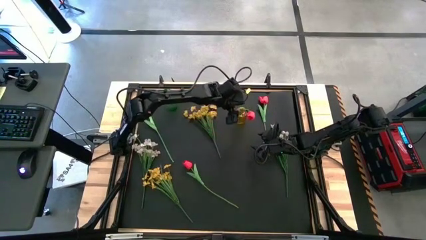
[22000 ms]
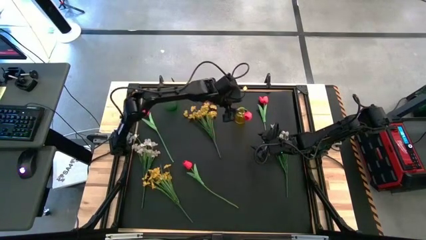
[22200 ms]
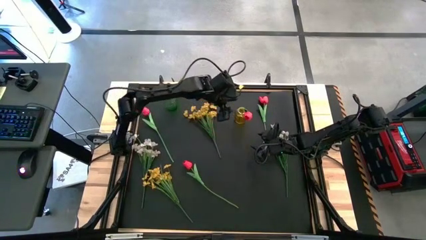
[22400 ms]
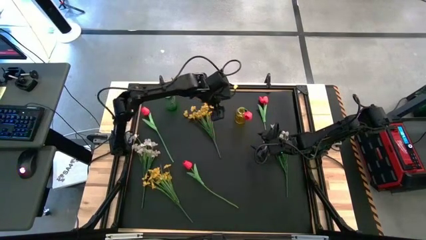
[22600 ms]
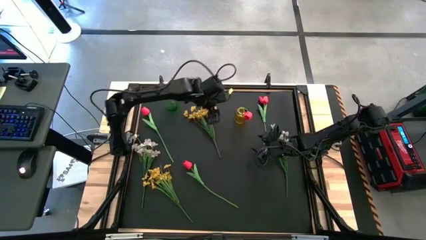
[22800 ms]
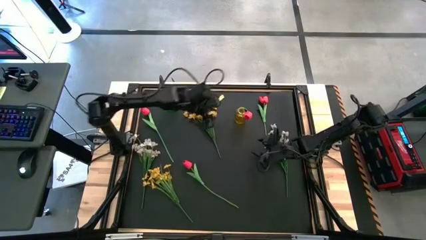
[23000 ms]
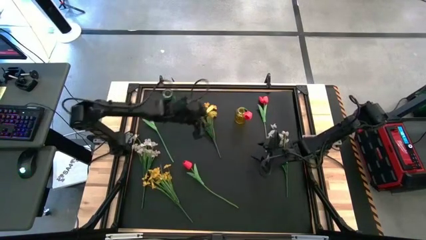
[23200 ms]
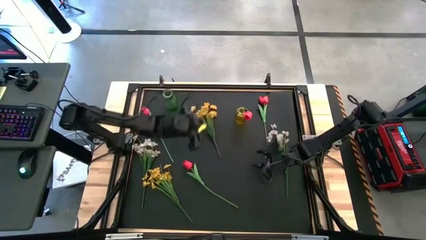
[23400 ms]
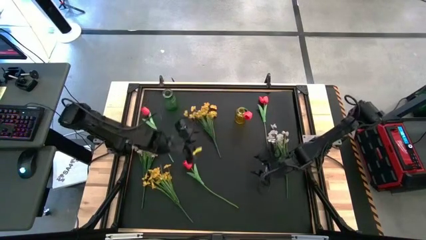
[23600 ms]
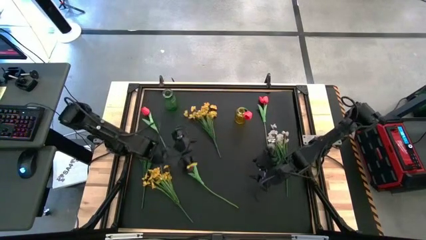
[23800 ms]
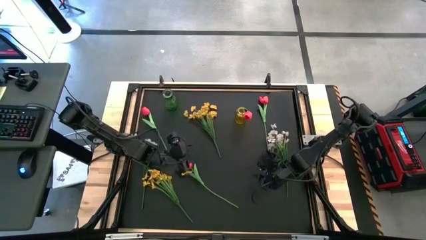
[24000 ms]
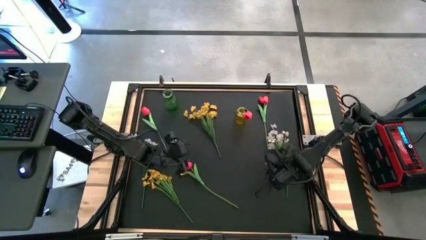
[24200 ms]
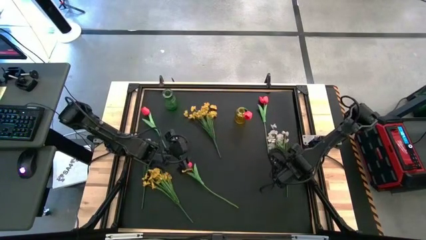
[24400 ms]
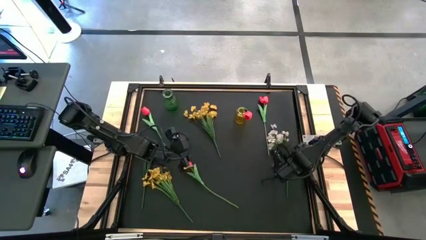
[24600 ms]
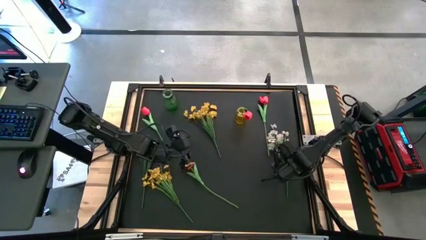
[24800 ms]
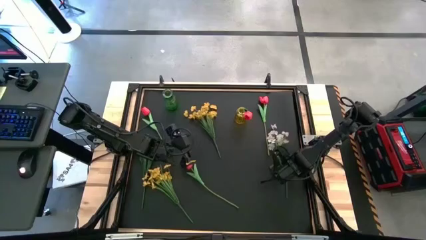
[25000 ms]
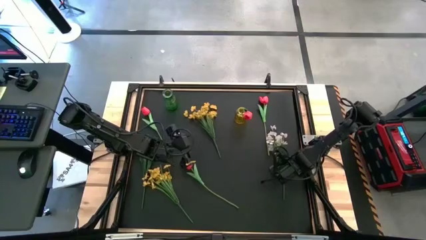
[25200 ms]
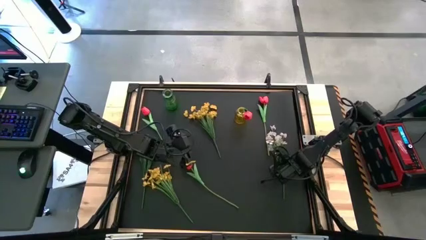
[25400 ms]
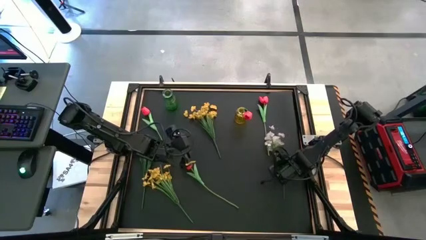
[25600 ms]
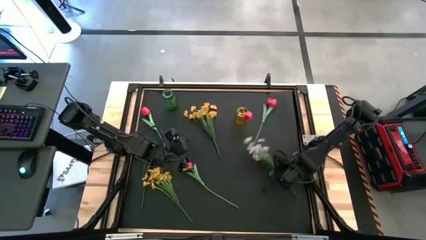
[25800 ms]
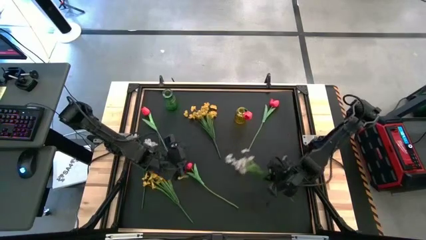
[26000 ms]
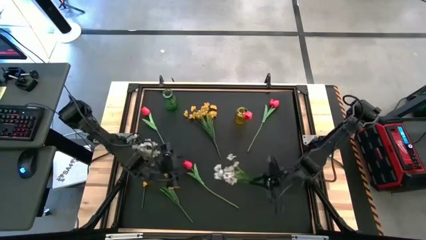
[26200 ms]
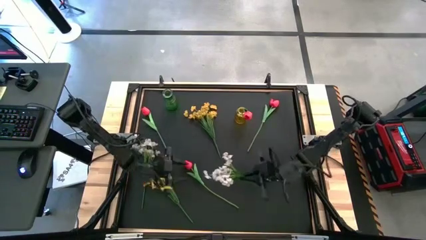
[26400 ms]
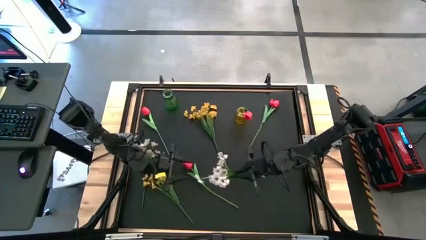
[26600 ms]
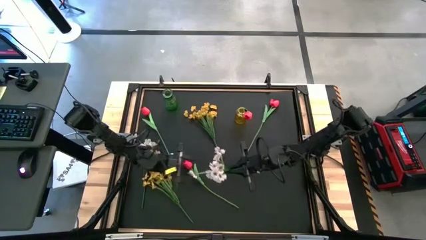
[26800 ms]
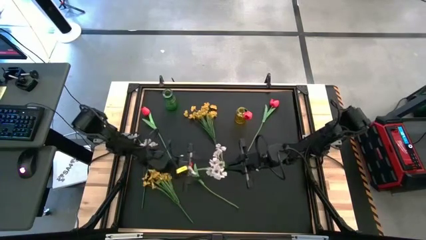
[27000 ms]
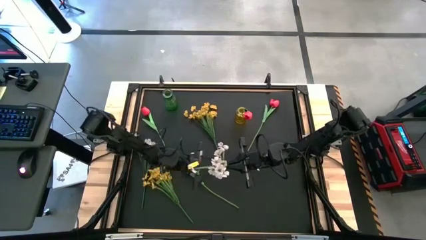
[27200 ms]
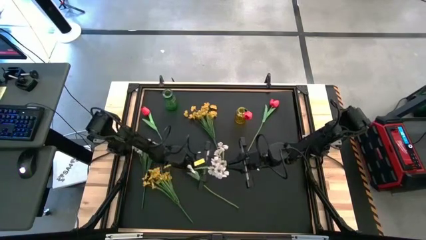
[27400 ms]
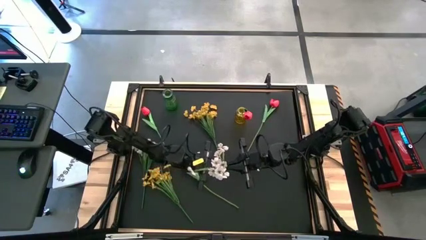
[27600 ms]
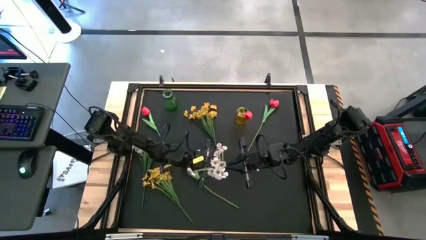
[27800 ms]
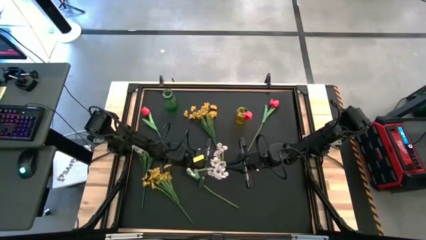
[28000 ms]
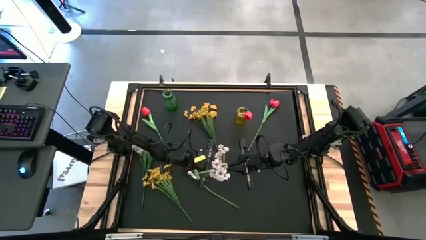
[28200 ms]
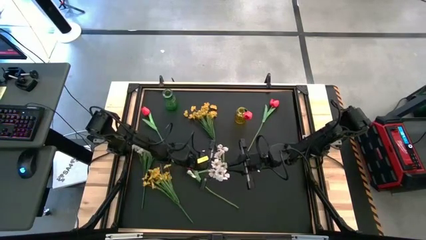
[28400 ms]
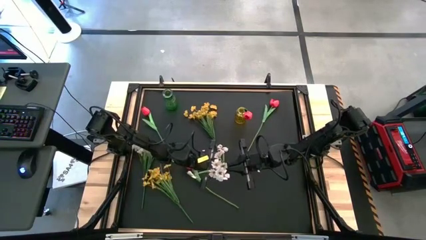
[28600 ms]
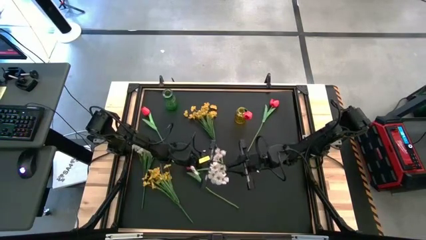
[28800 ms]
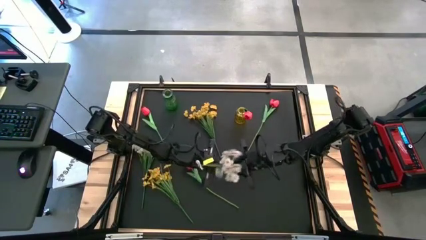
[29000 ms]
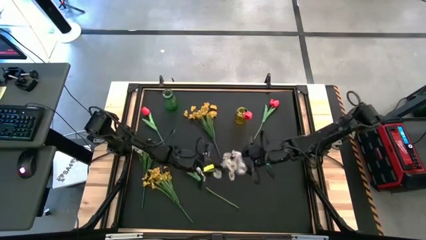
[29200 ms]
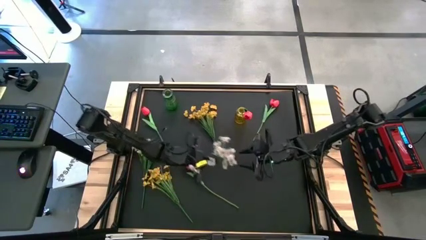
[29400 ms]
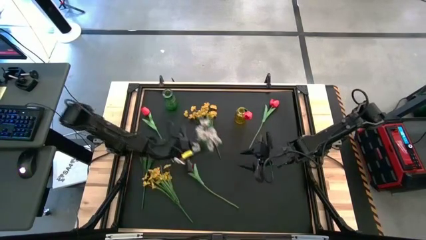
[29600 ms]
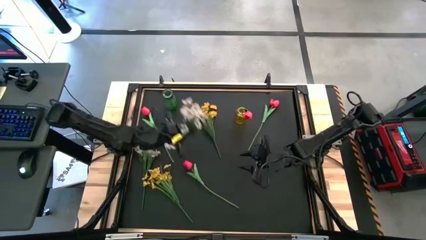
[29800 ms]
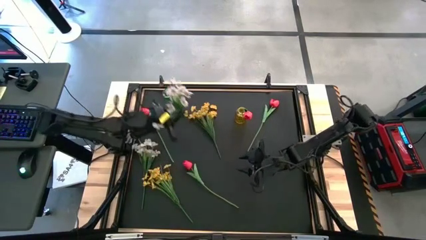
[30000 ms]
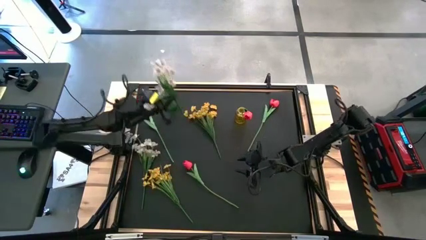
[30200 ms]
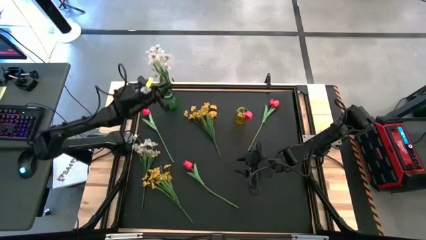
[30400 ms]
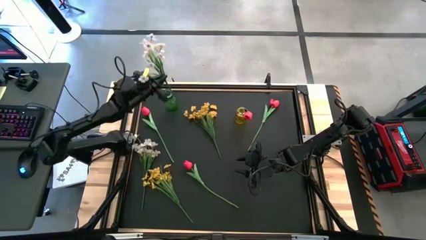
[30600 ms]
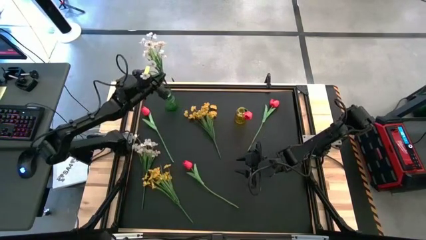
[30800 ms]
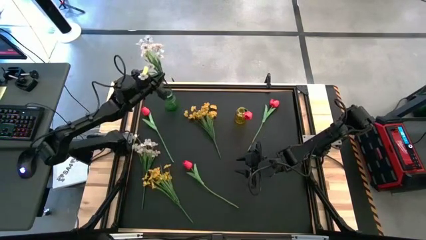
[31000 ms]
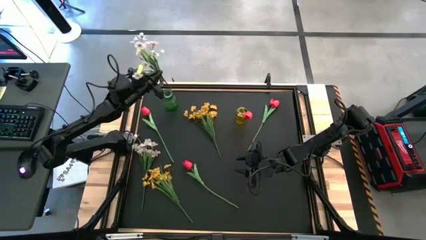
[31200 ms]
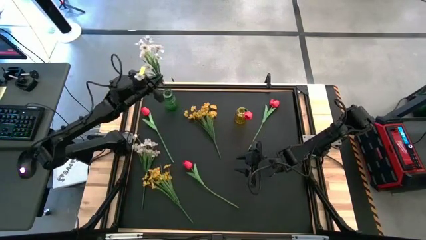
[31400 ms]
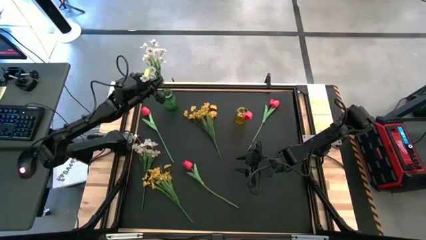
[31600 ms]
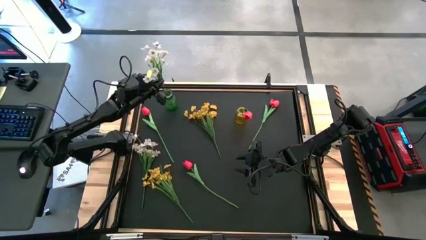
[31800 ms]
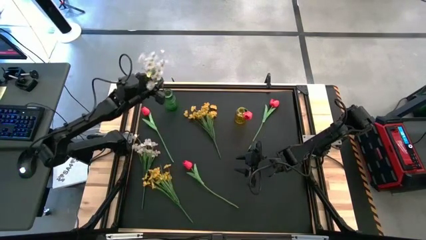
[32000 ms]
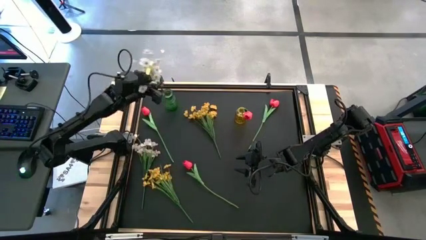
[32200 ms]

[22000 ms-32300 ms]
Task: Sort flowers into vase by color
Put the right white flowers into the green vase

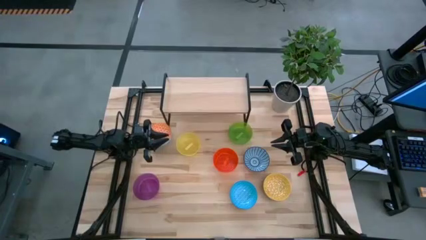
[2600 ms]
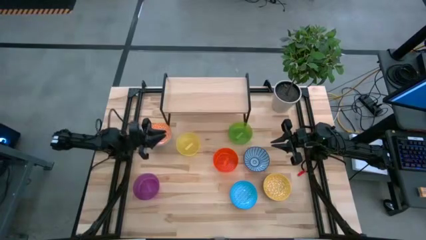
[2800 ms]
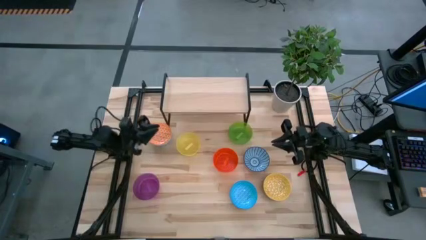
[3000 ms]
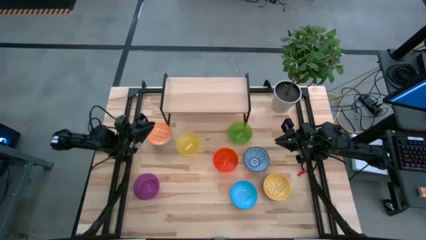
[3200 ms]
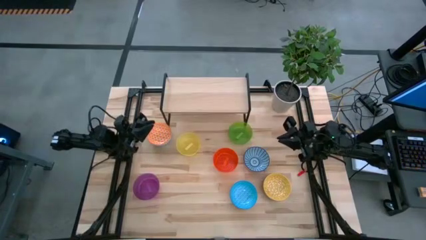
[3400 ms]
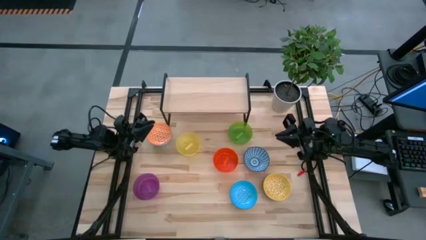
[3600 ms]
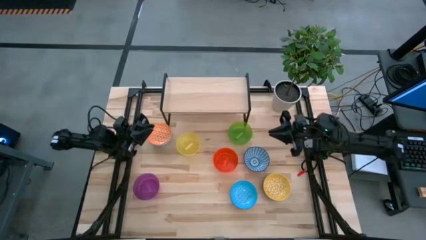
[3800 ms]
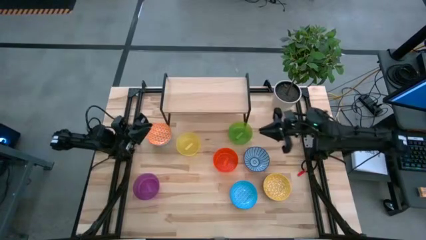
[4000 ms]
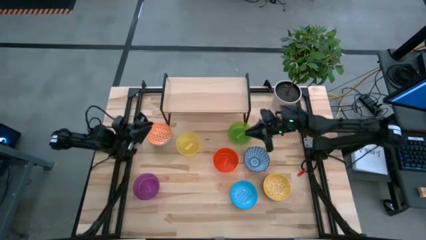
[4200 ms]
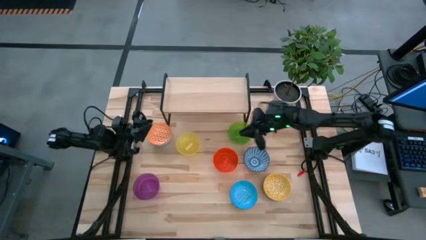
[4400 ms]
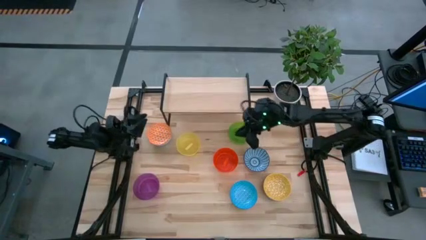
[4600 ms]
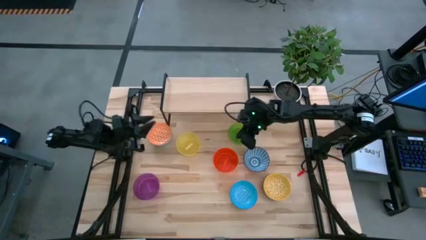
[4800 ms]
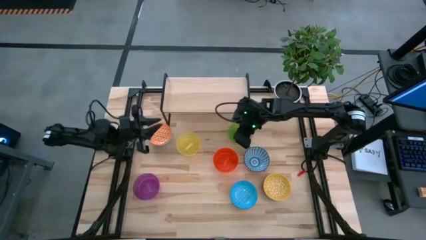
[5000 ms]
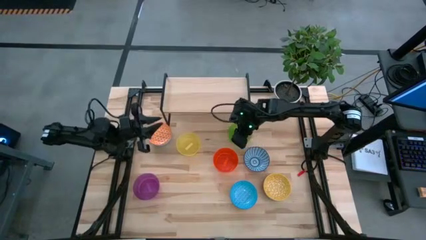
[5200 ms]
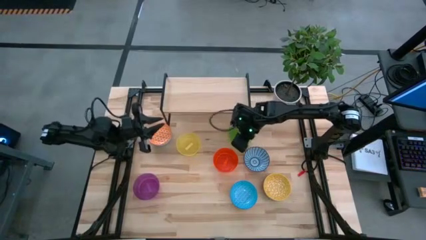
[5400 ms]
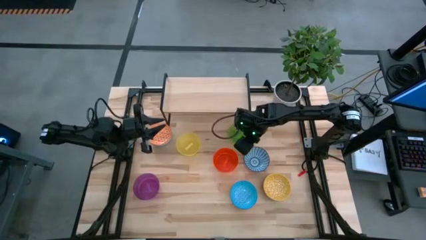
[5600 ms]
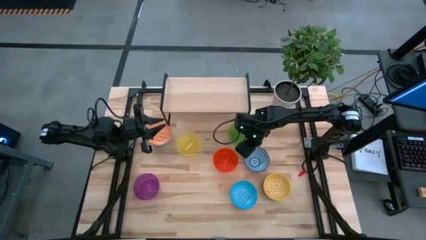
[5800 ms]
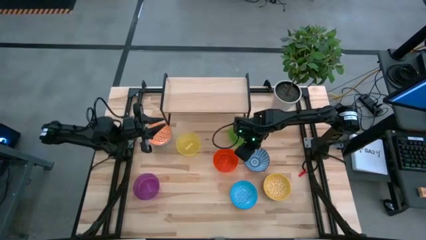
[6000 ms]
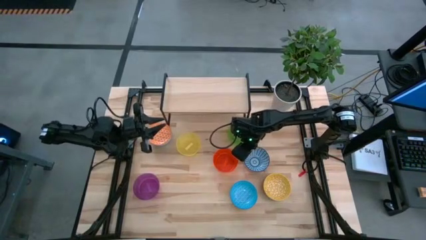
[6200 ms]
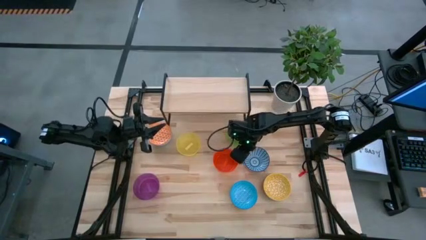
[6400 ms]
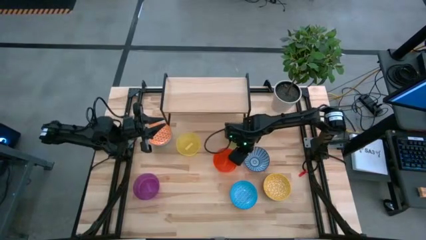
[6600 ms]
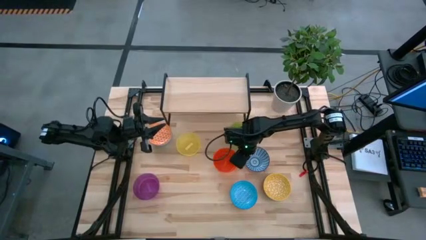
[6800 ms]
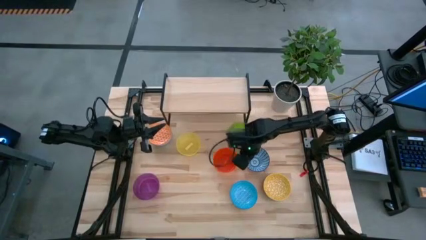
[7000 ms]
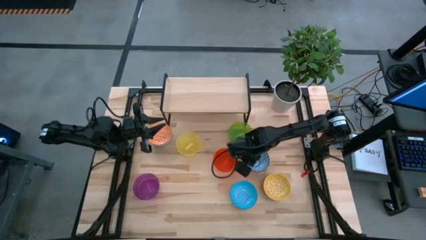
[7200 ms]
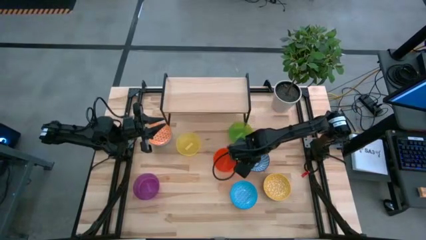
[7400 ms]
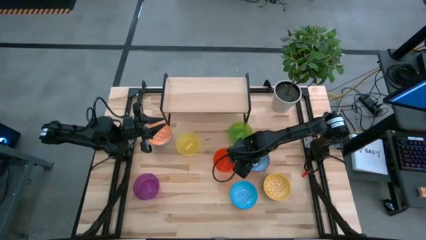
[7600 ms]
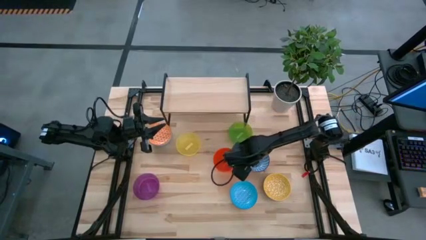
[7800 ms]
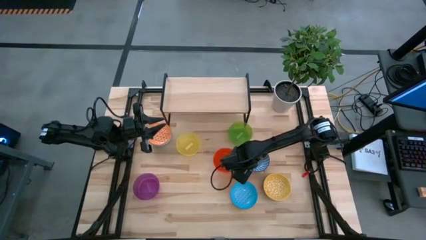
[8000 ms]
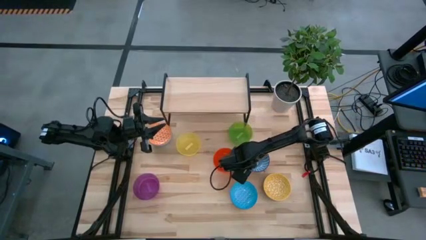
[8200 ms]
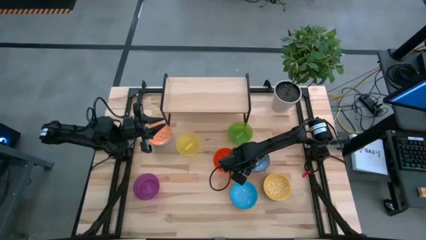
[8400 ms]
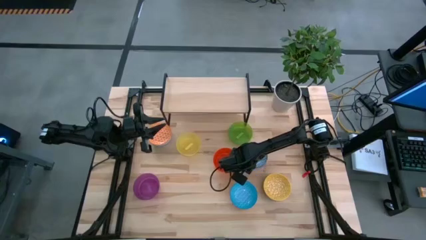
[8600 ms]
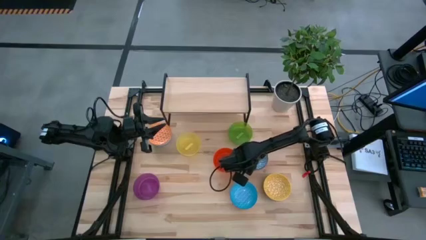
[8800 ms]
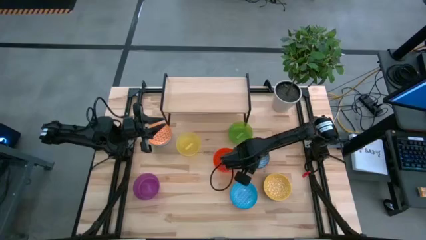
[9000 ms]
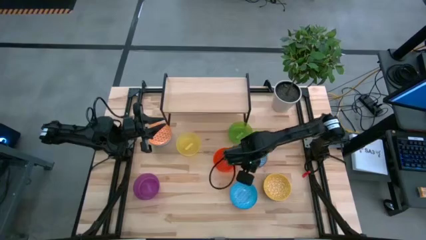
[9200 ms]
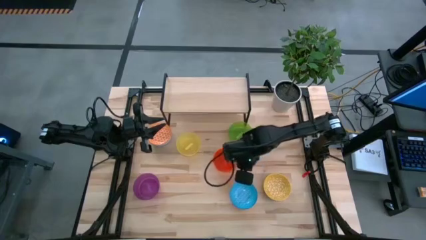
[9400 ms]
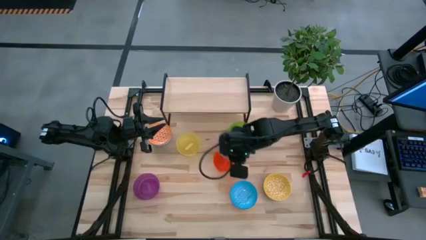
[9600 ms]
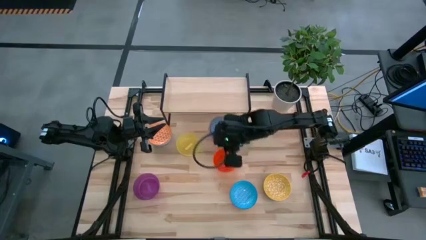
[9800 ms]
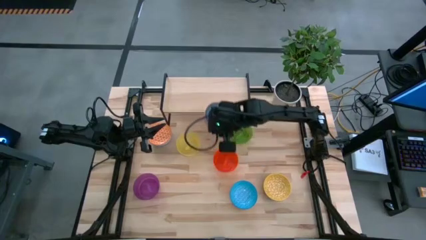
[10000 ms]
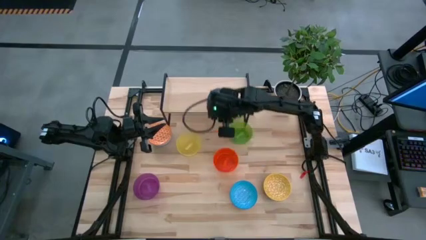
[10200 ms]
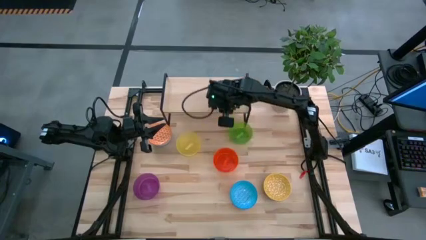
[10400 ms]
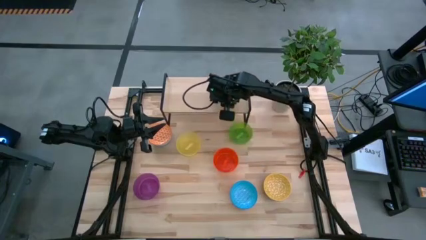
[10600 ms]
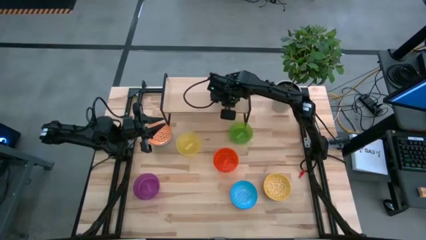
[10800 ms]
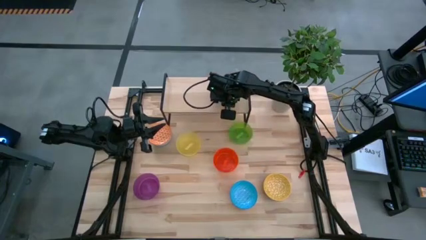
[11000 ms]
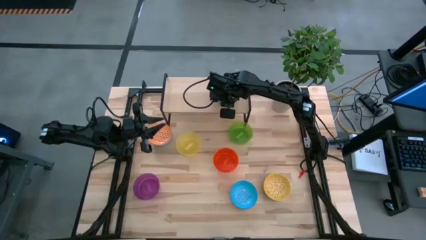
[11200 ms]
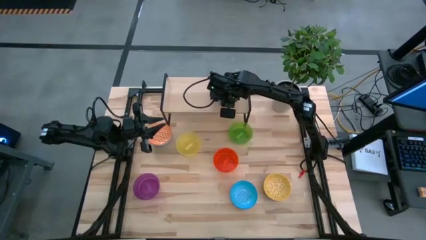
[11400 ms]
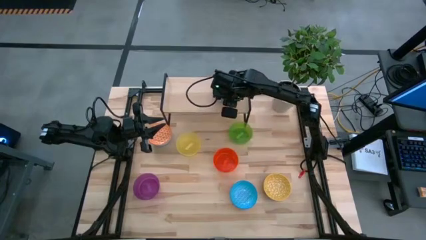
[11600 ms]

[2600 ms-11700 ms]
Task: Place and stack bowls onto a shelf
Put the blue patterned bowl on the shelf
